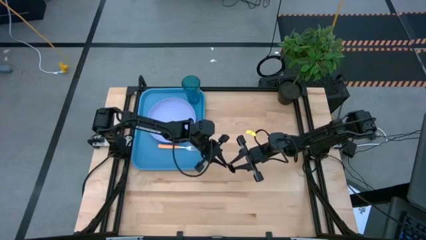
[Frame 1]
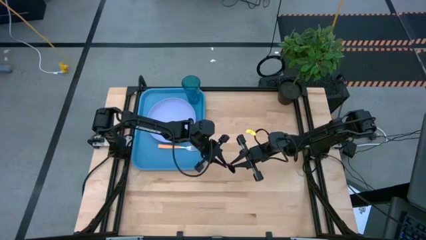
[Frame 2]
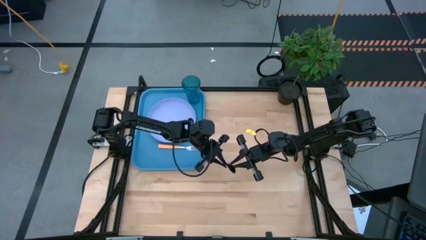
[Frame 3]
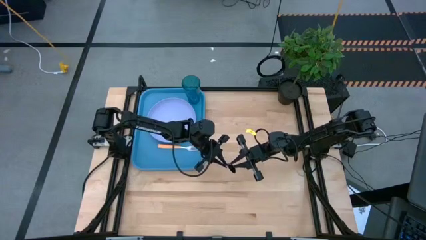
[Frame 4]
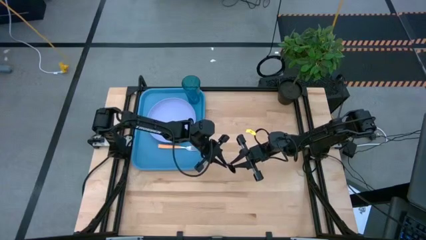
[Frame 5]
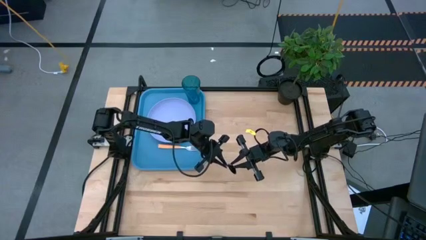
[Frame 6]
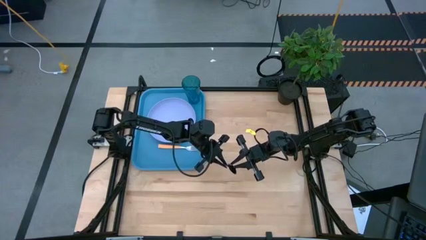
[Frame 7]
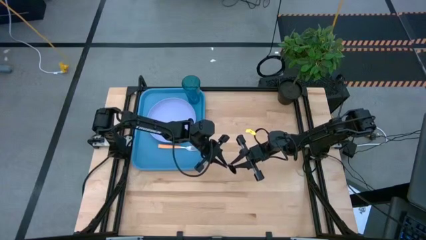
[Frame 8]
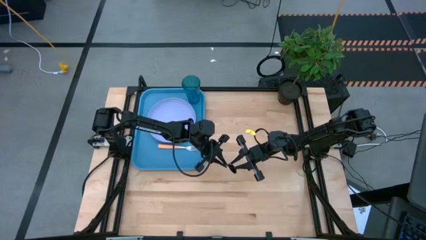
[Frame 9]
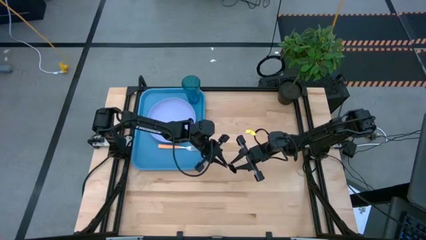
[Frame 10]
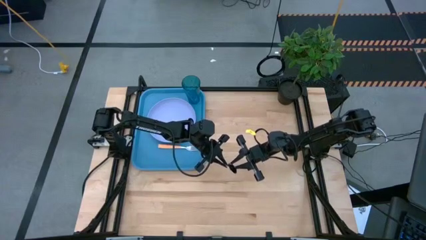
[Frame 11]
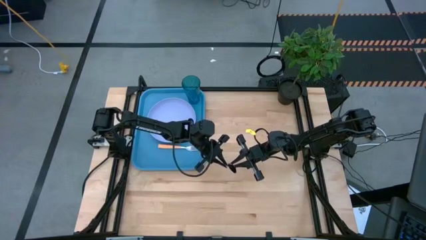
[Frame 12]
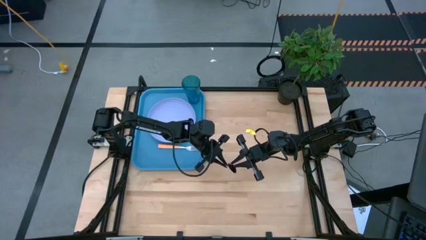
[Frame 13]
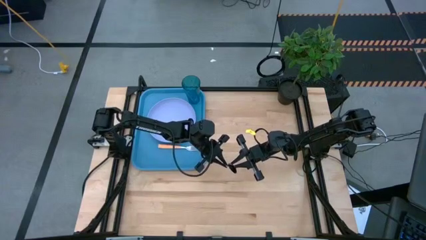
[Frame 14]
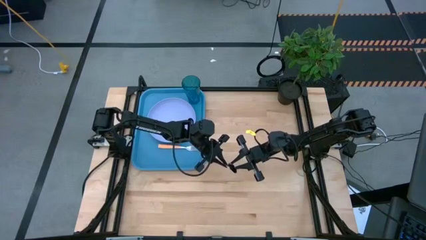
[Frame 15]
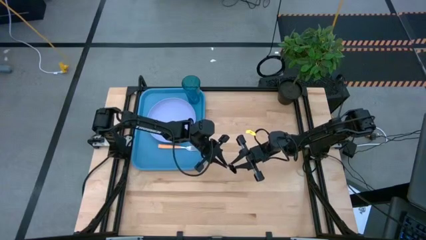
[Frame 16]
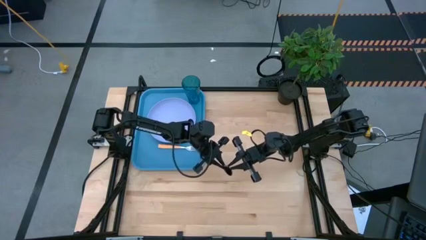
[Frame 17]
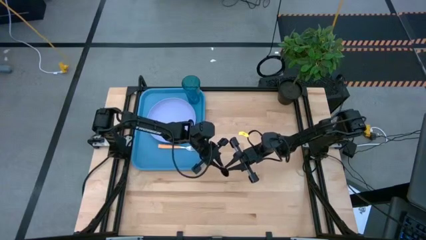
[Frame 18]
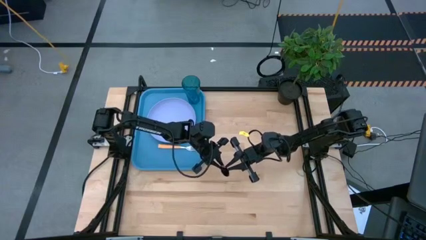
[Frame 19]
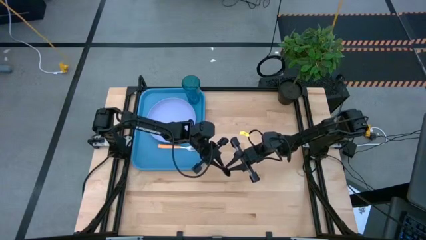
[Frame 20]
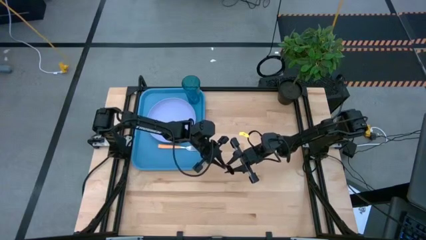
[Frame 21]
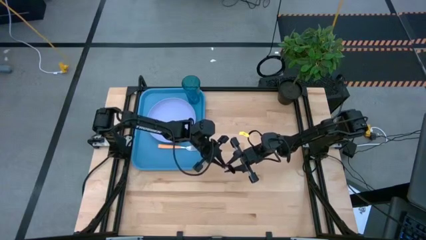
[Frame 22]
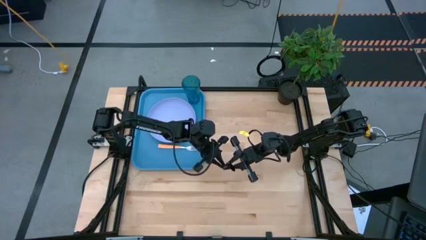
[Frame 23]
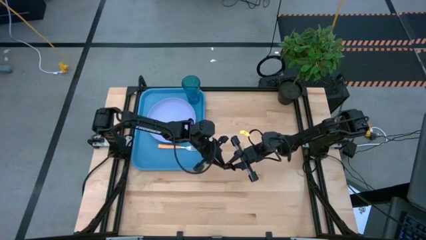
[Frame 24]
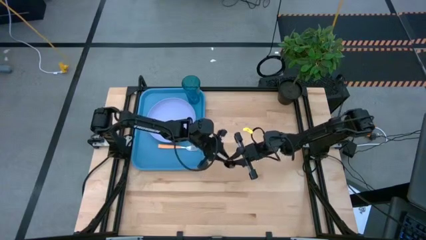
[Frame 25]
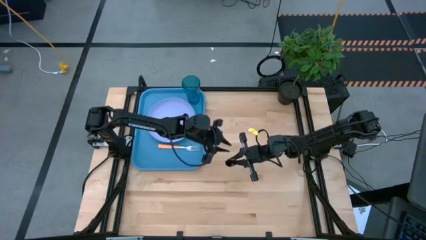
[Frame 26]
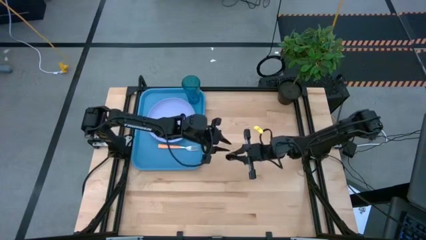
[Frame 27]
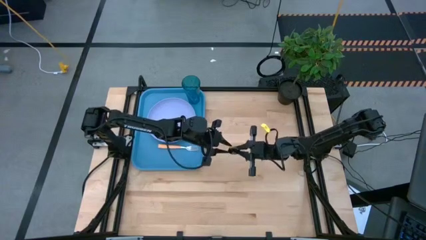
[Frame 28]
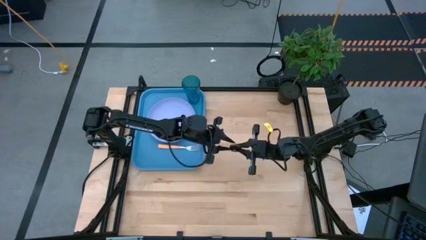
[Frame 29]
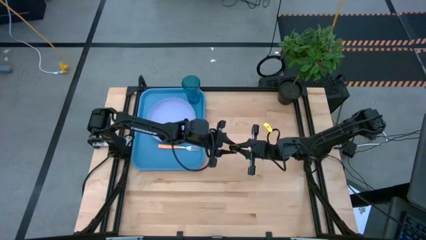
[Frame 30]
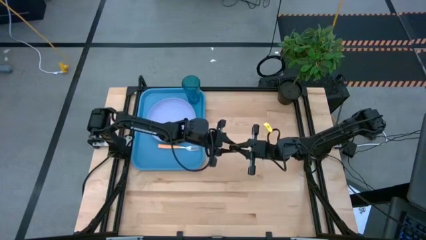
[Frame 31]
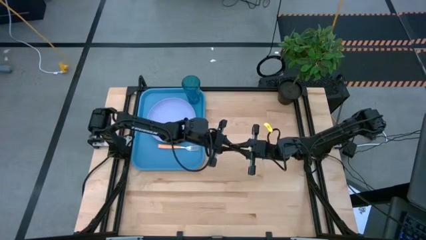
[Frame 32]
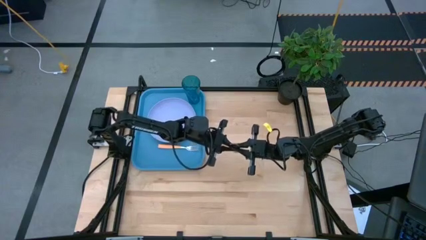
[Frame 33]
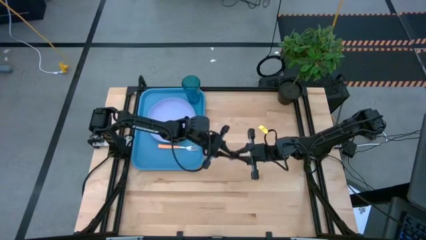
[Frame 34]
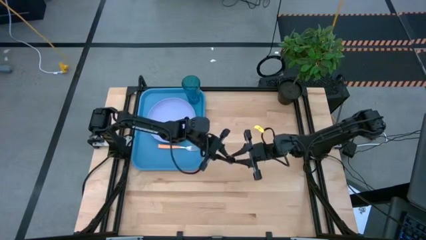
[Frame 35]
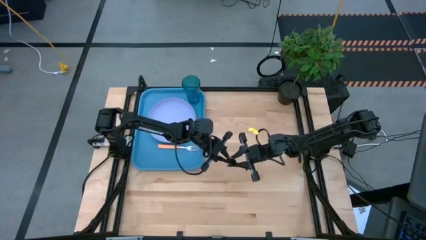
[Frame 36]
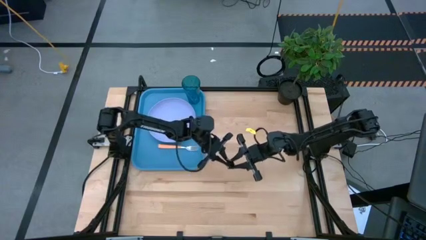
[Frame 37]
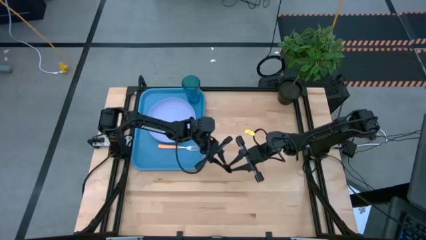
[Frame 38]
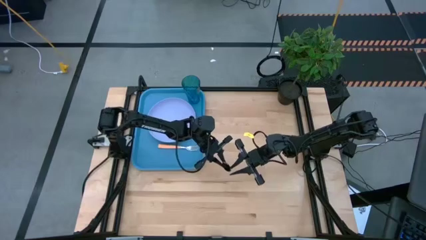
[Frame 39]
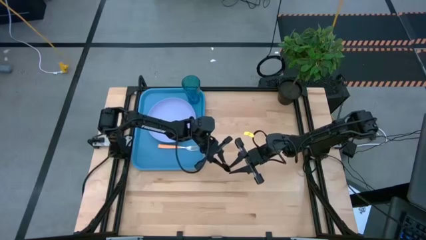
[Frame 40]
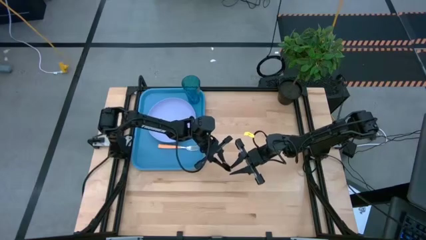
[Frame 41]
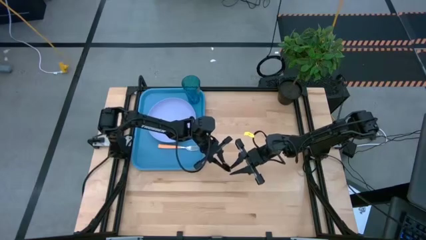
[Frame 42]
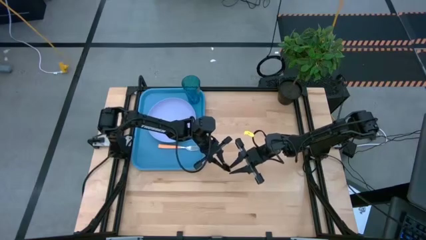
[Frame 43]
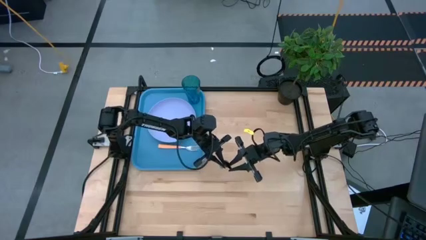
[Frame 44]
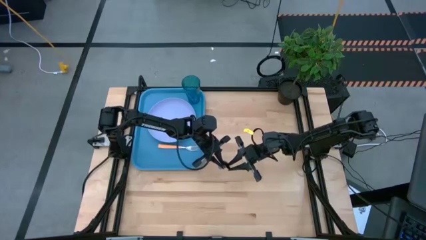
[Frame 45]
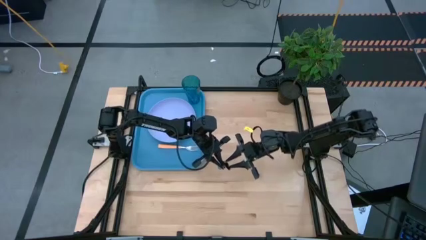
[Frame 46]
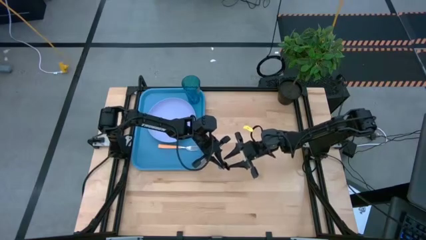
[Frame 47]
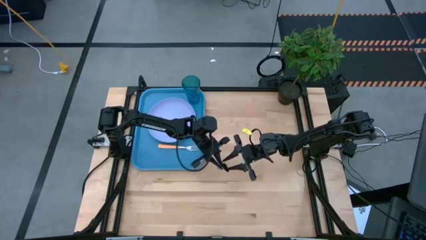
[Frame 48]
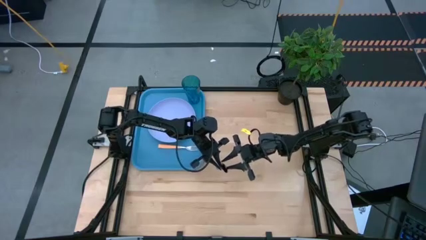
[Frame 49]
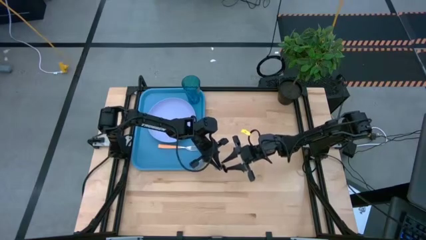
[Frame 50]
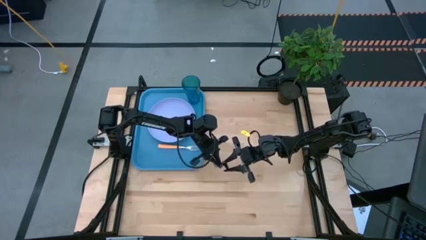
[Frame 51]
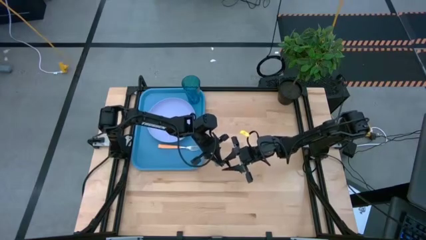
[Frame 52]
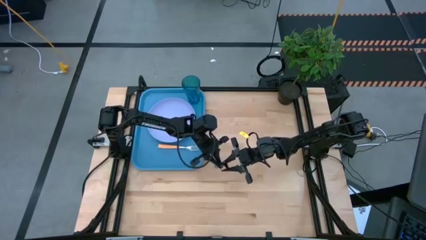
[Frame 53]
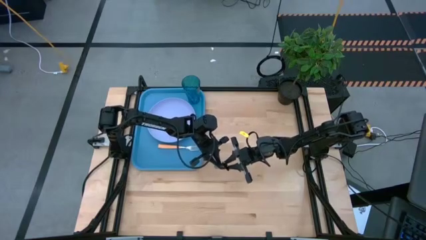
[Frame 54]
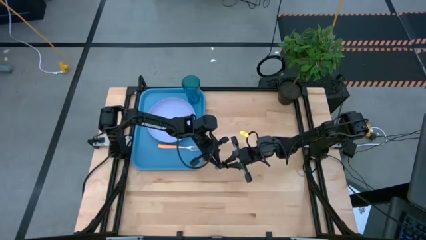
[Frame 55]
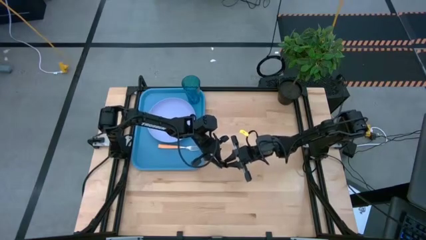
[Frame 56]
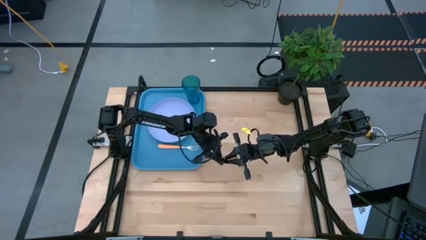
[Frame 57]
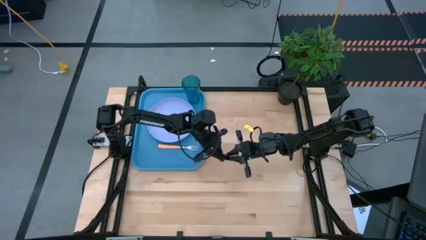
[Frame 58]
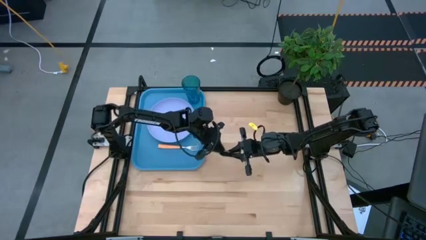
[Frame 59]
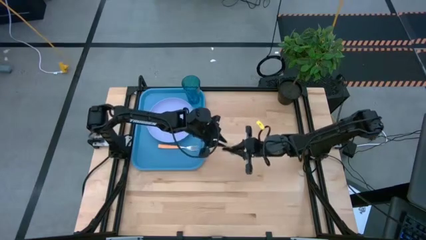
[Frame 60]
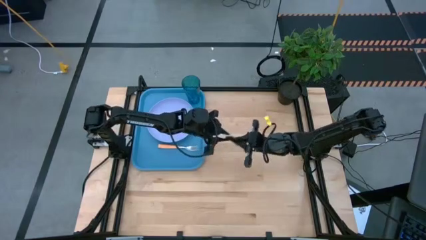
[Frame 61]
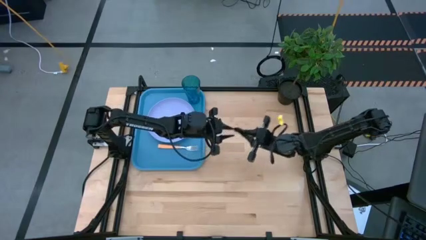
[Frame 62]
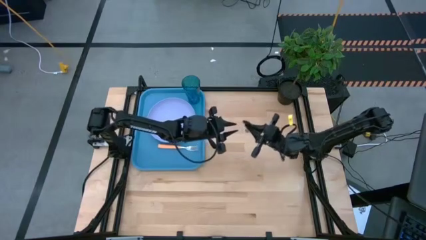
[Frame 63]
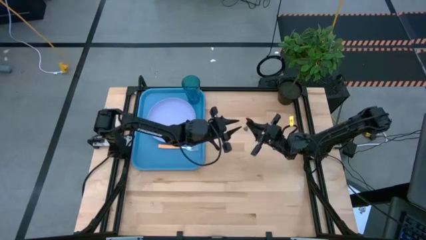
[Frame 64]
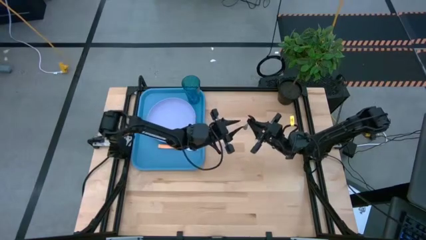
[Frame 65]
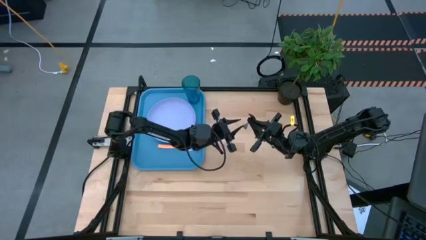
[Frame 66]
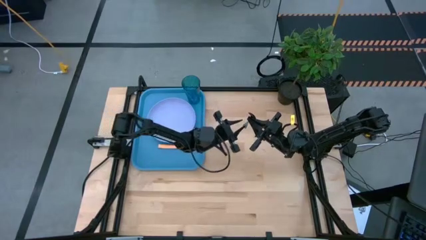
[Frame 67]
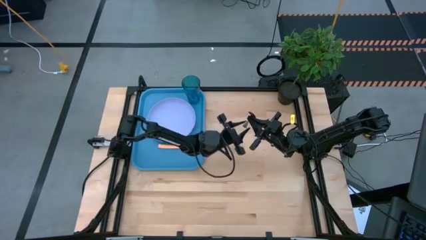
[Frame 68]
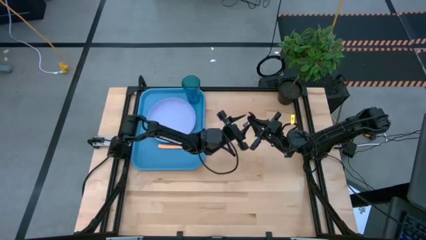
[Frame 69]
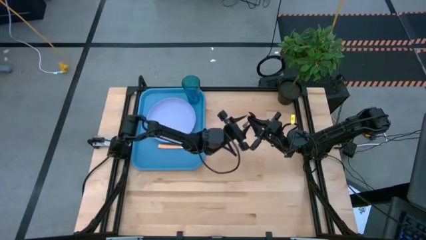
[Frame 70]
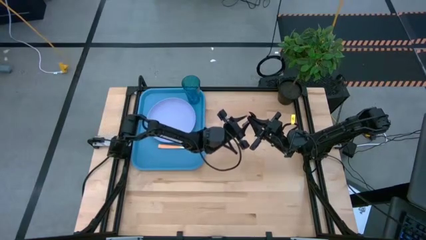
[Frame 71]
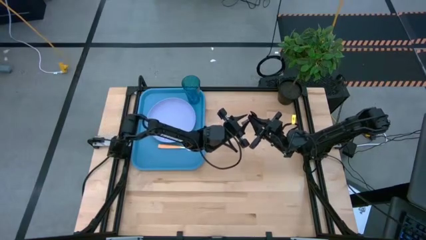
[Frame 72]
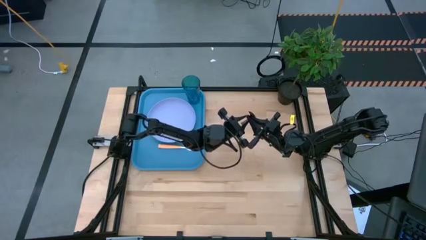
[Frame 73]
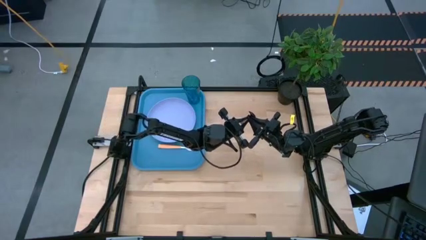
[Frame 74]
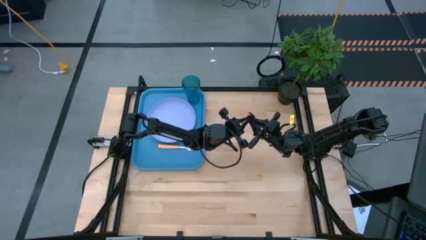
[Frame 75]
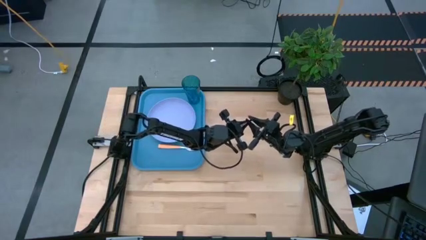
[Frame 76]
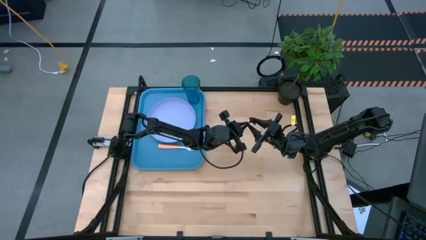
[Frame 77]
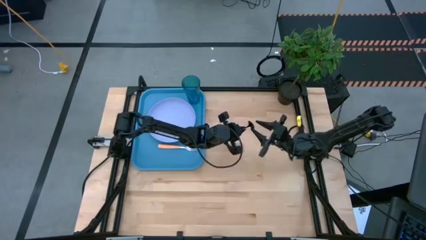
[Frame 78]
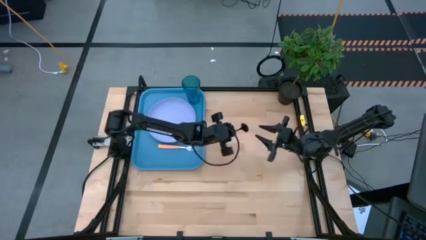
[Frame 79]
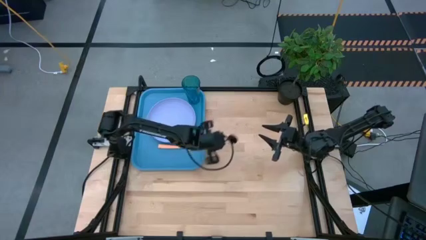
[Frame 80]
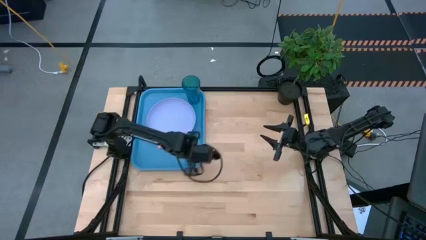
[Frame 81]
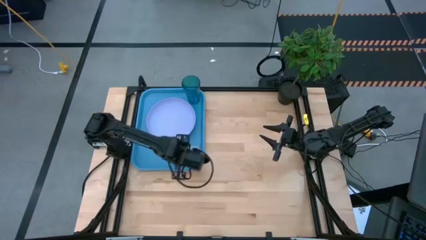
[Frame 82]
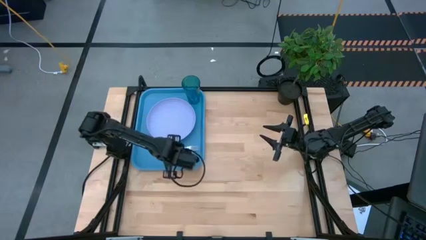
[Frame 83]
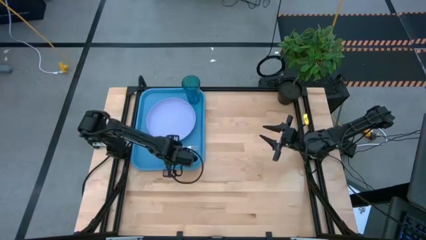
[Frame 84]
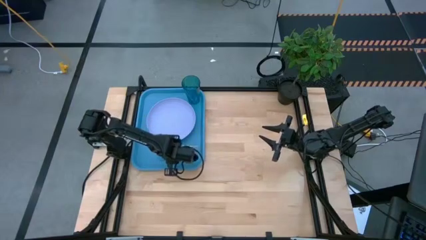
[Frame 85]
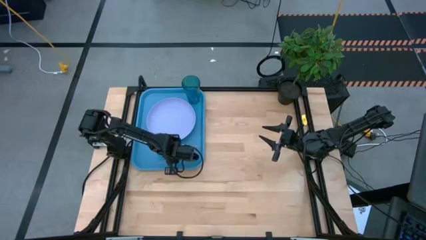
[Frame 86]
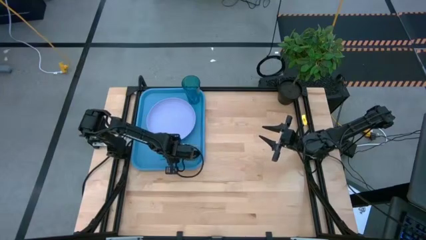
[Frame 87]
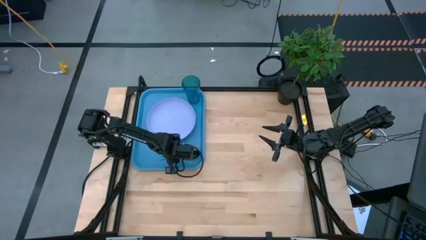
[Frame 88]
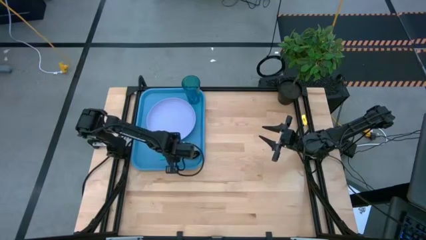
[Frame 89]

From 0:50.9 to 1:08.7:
Task: Pick and place plate/cup/fork/spoon on tray
Put the blue spoon on the blue tray
